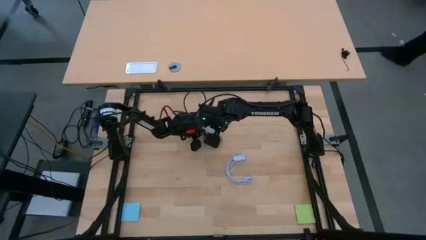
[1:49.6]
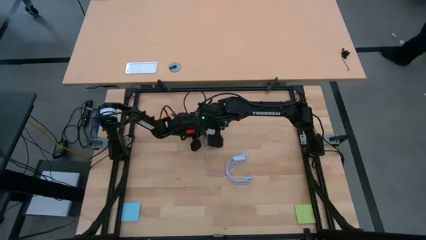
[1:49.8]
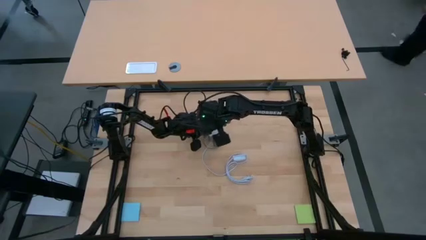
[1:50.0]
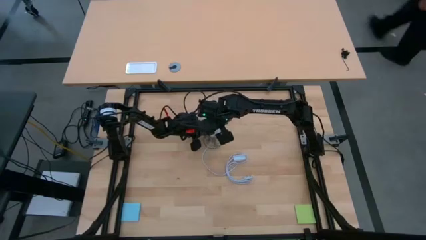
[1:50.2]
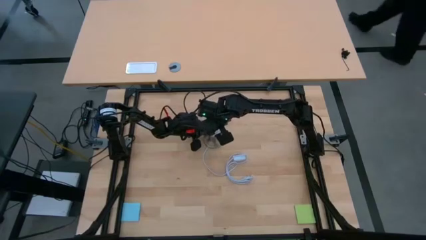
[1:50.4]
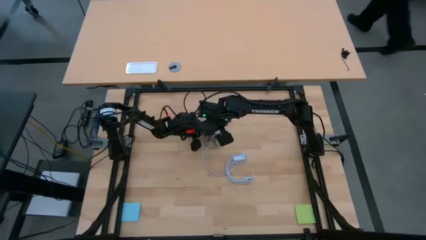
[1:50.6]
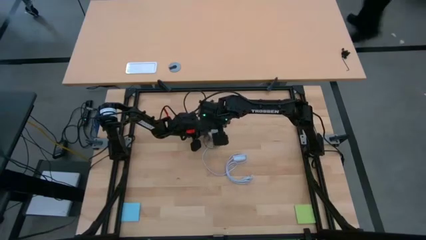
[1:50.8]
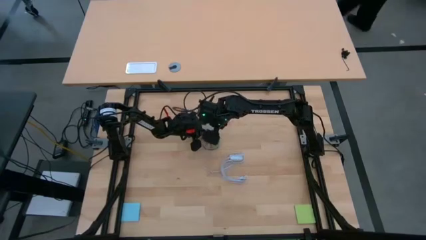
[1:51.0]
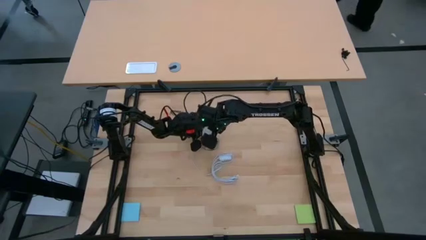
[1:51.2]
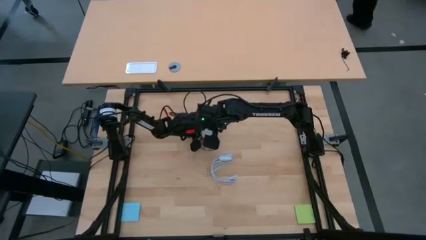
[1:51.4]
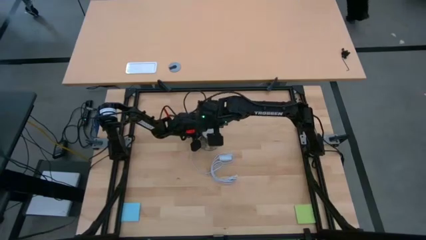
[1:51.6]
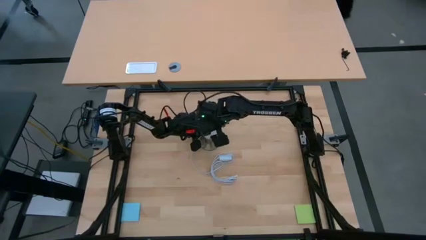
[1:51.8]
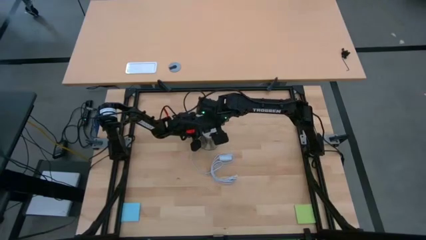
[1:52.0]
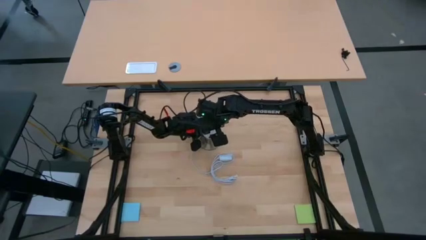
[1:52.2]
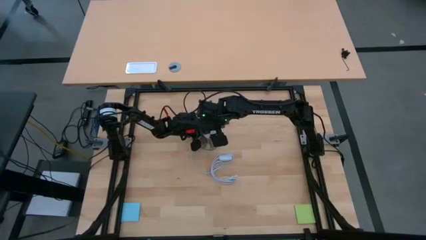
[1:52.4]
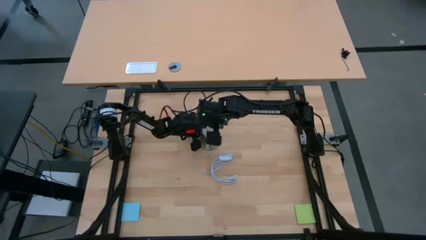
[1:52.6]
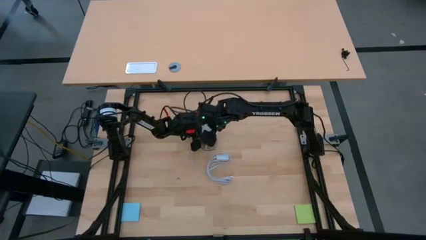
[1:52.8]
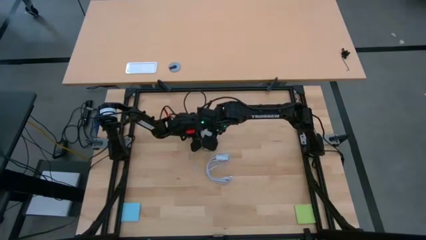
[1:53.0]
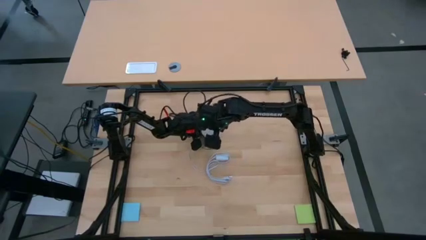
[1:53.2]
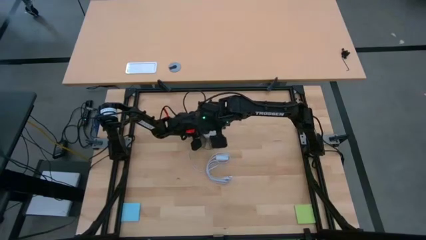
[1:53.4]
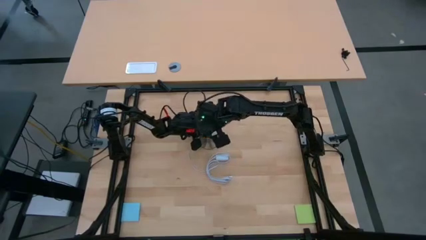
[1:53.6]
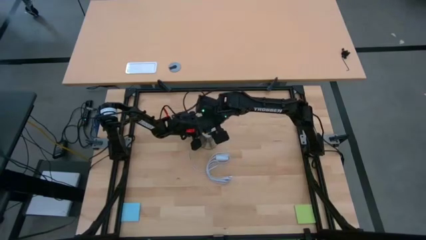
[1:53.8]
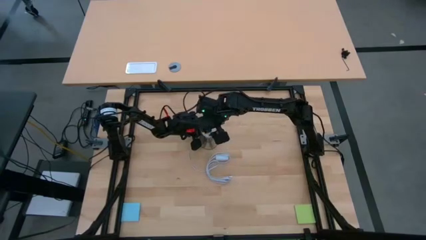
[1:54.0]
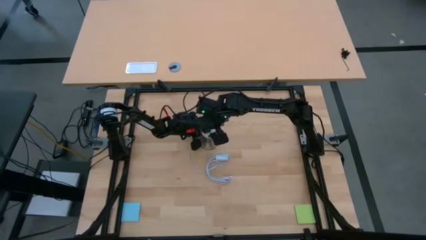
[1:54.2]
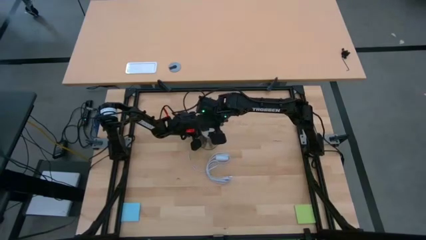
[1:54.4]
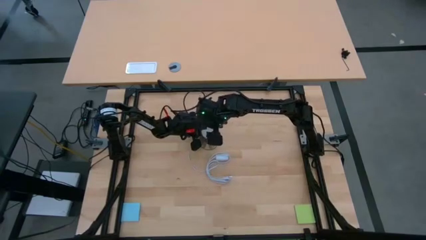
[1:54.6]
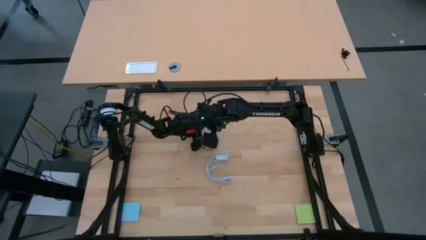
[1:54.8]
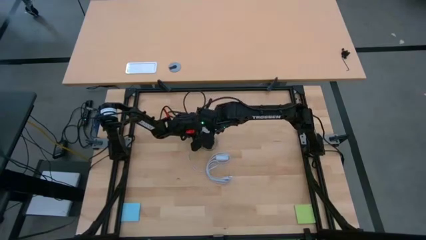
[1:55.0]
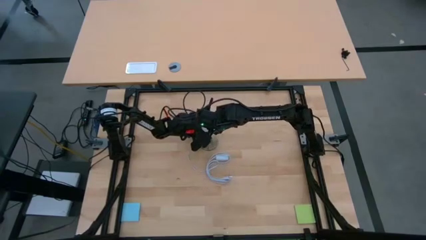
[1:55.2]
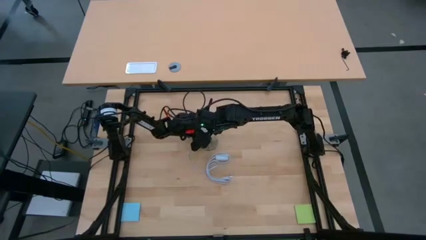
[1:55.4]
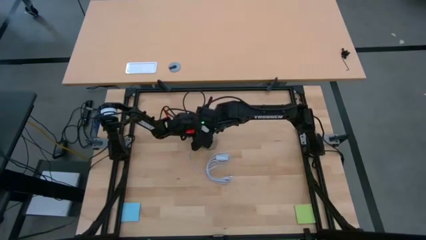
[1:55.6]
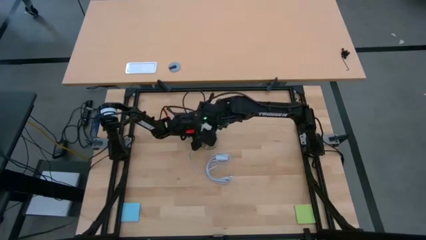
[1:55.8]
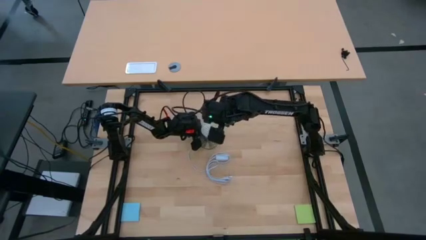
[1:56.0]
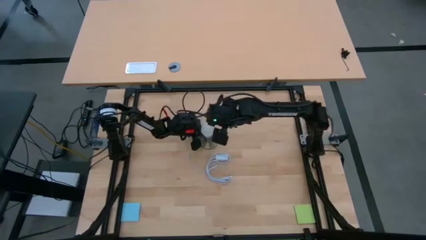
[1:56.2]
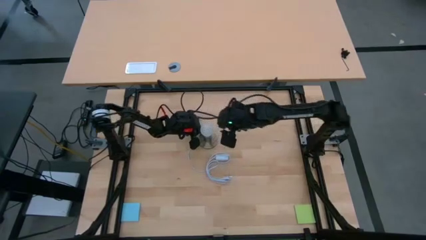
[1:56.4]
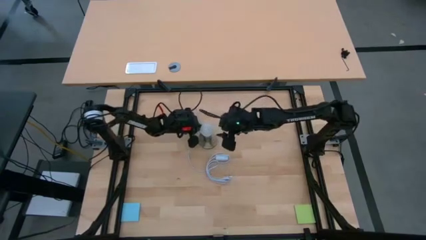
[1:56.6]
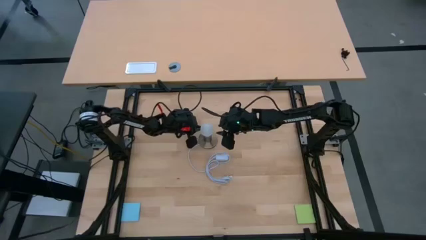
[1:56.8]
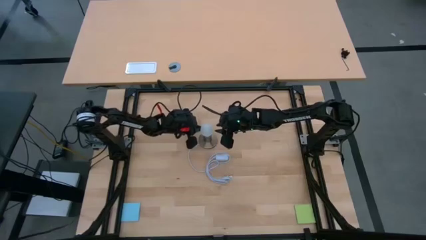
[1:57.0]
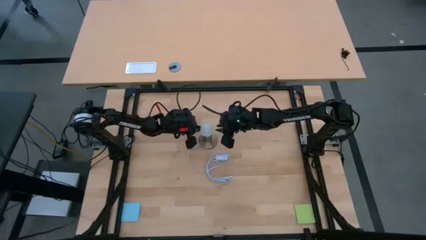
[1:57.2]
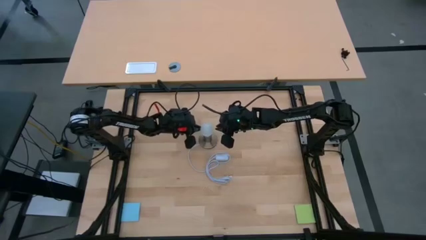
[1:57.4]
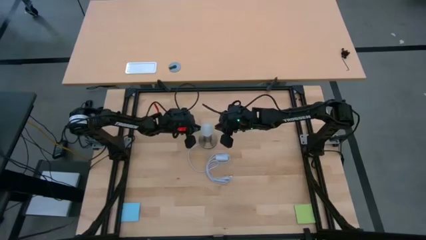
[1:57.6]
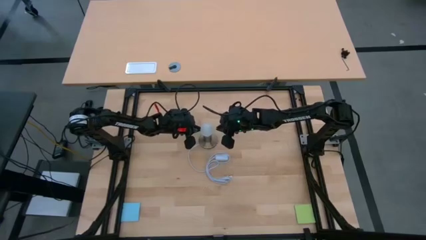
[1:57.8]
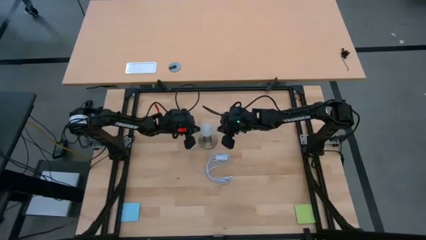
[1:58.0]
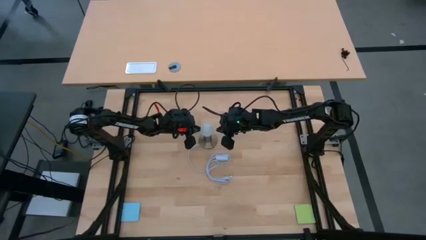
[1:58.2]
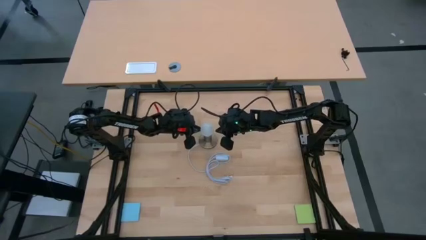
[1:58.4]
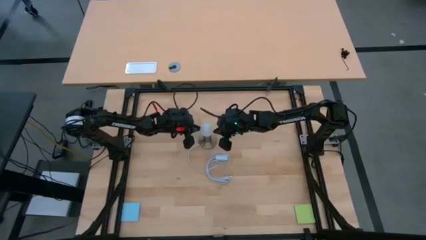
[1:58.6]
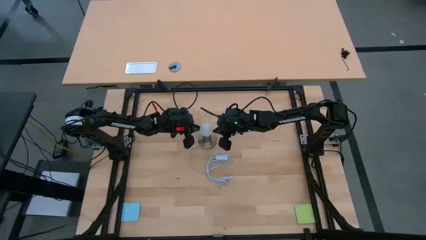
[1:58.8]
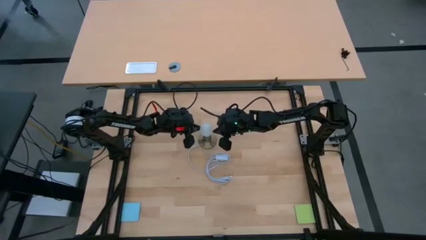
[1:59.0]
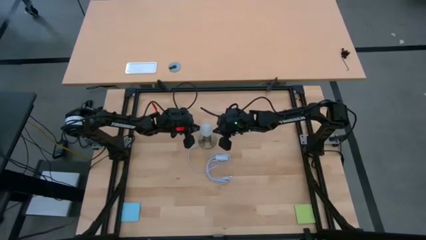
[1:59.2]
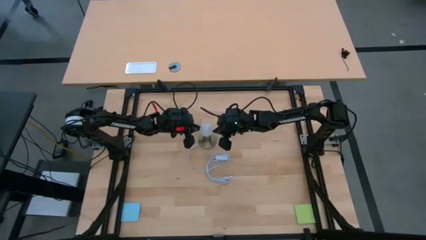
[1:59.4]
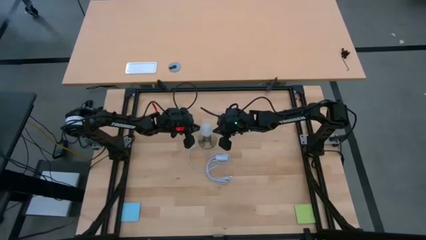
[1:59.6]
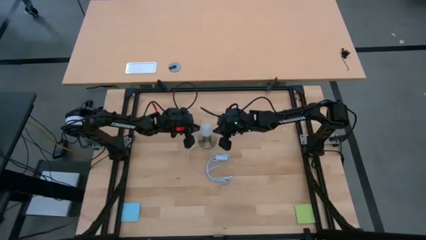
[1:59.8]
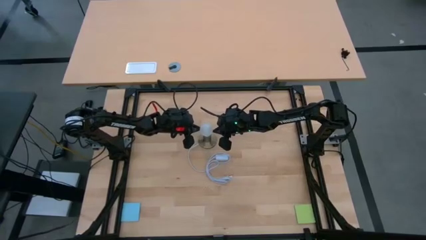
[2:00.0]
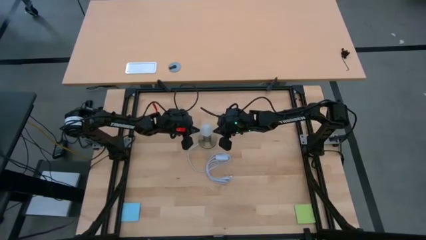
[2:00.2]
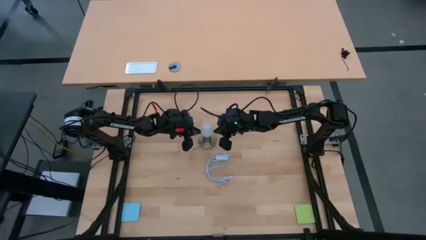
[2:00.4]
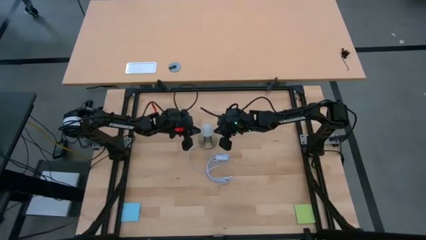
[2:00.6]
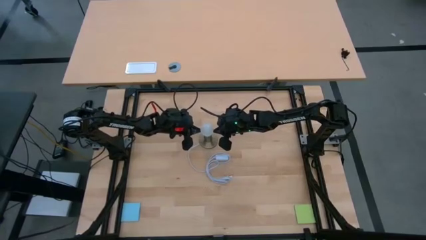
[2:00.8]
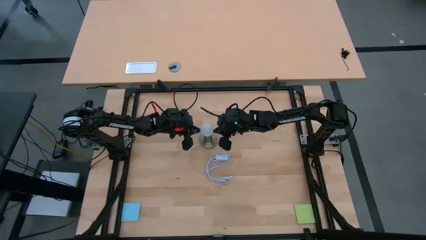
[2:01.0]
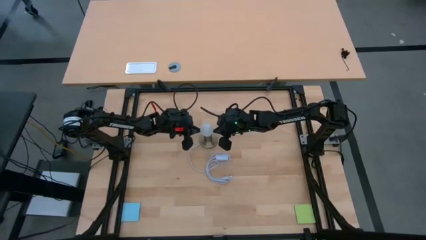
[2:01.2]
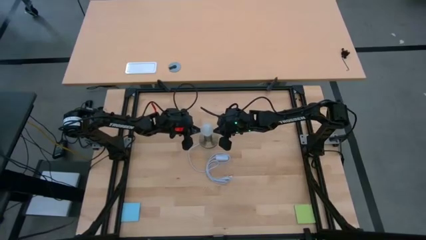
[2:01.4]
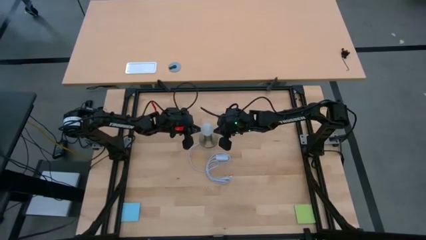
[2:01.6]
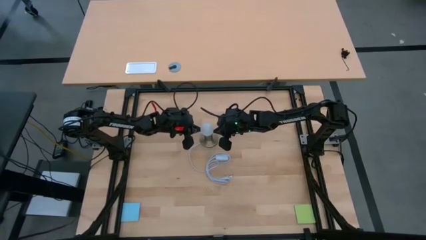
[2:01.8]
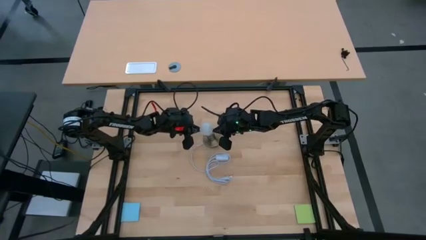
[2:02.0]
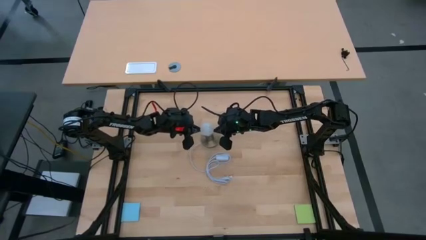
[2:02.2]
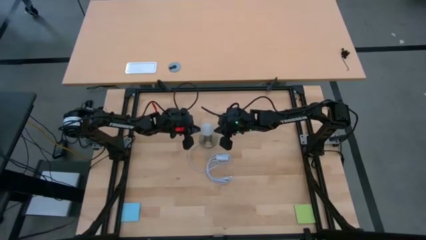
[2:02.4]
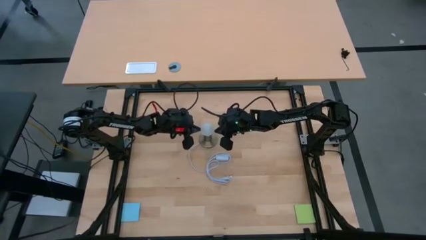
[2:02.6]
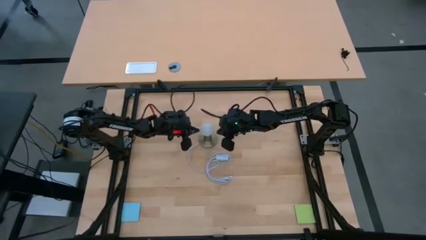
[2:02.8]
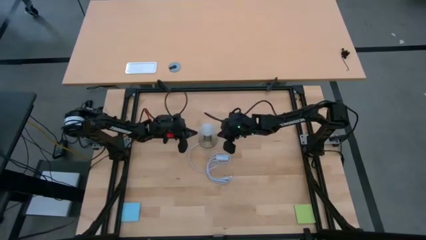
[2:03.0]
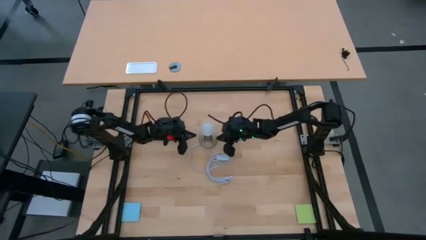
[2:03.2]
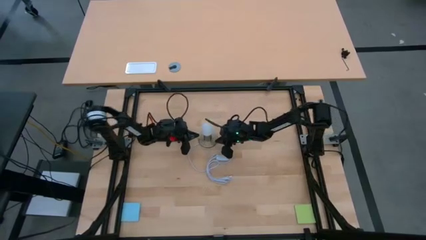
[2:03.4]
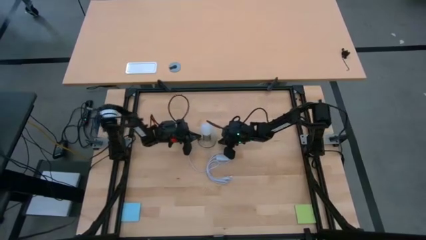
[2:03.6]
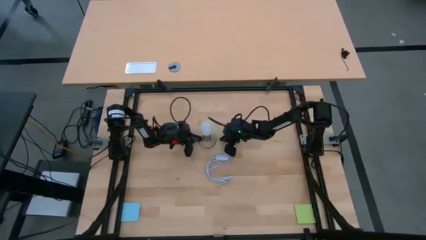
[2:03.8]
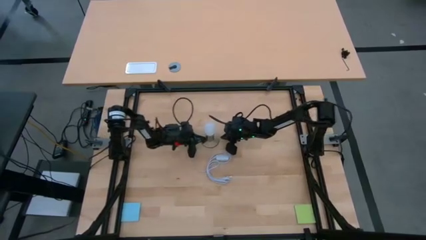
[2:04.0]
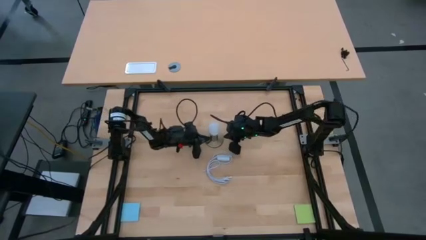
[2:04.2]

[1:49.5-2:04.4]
Task: Screw lightbulb
Insert the white lightbulb into the golden lamp
